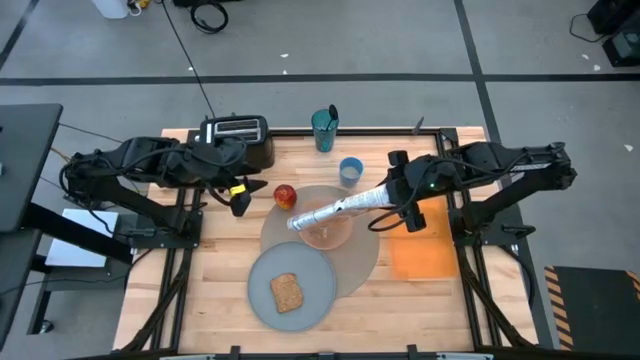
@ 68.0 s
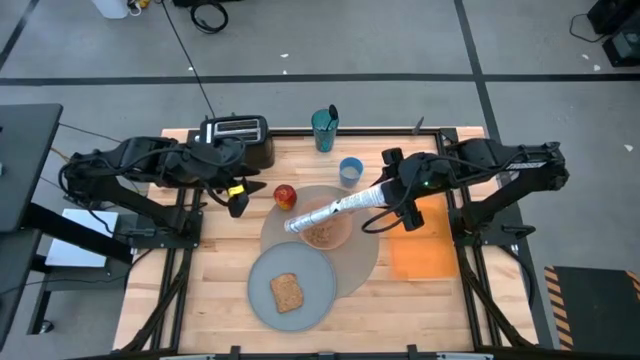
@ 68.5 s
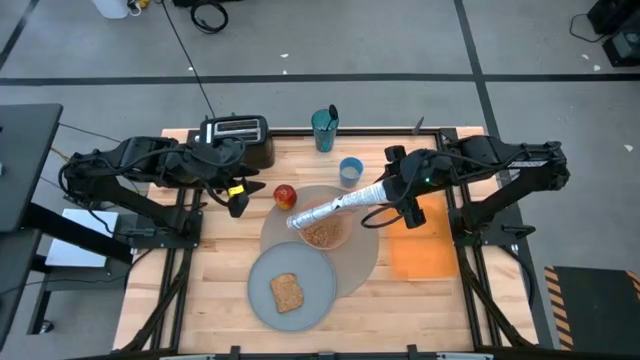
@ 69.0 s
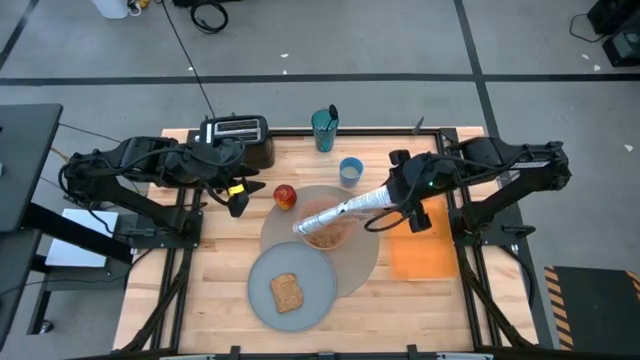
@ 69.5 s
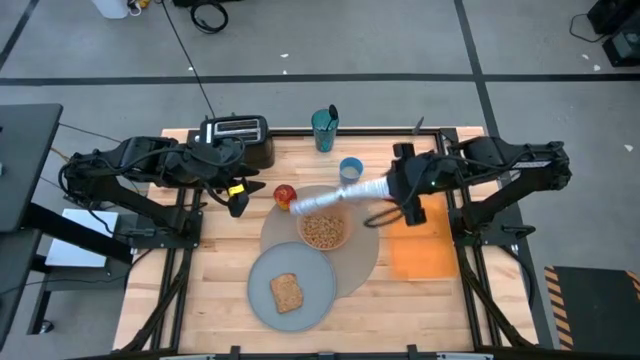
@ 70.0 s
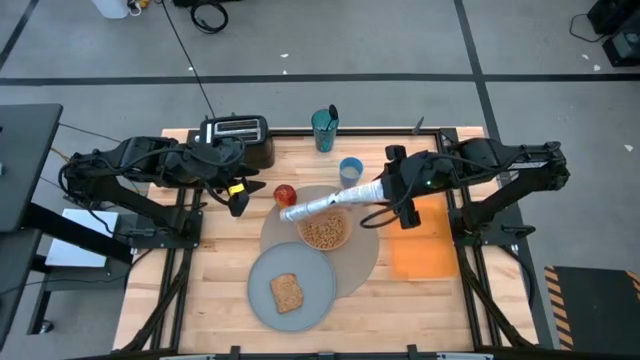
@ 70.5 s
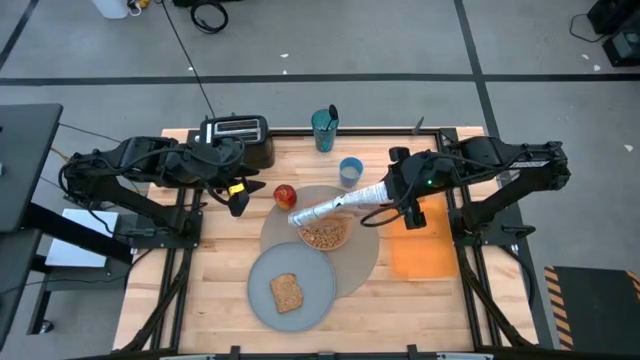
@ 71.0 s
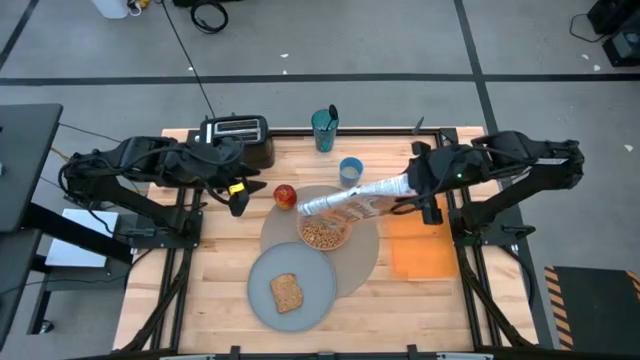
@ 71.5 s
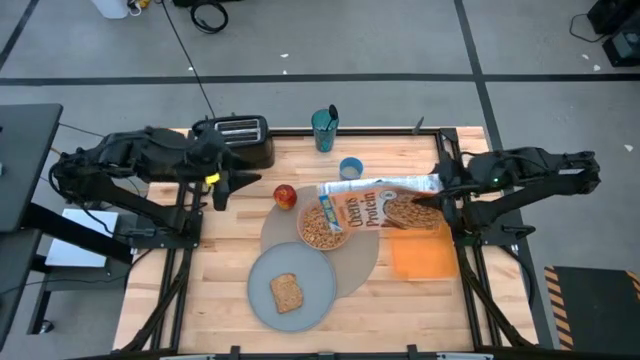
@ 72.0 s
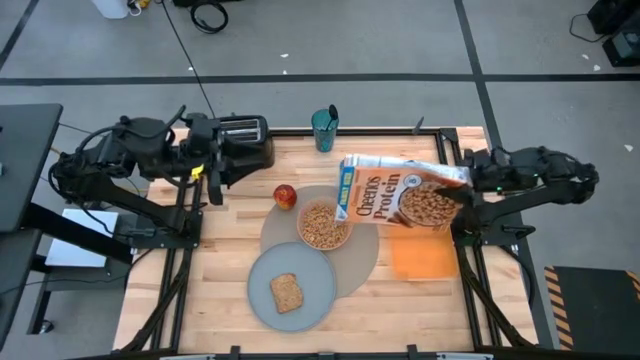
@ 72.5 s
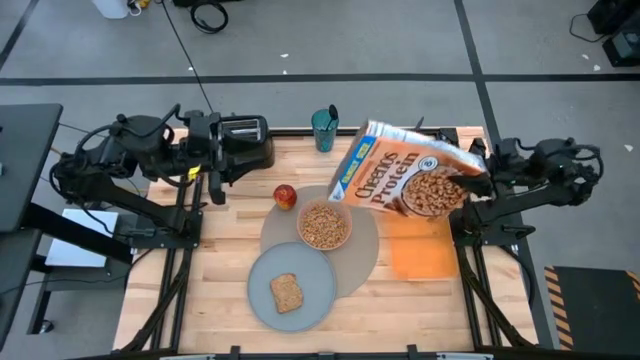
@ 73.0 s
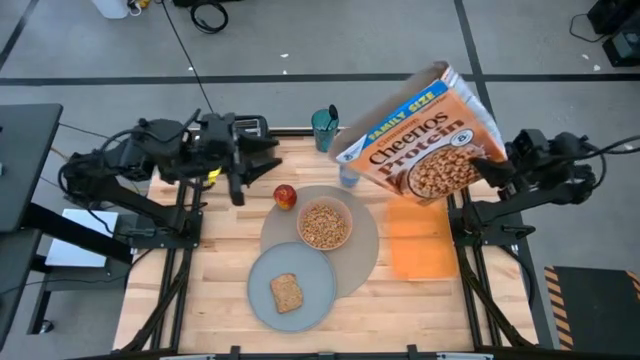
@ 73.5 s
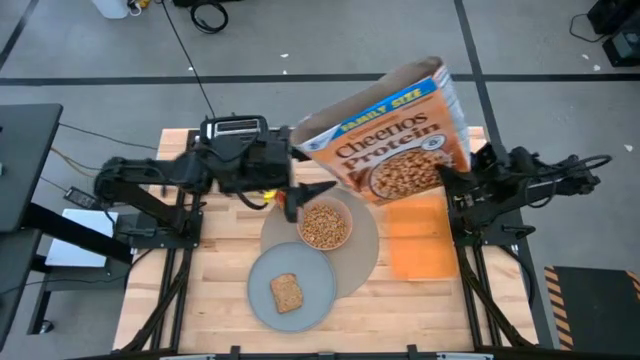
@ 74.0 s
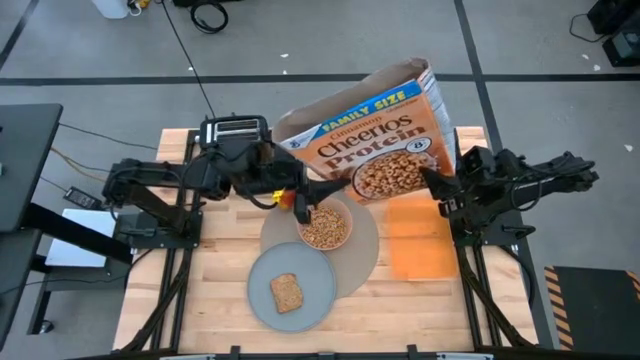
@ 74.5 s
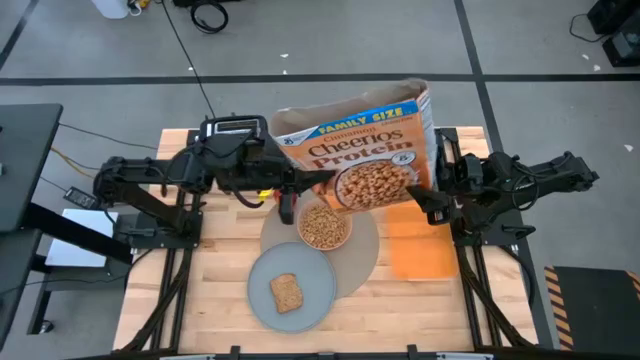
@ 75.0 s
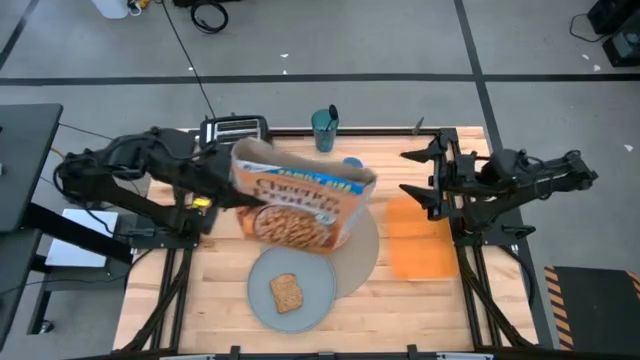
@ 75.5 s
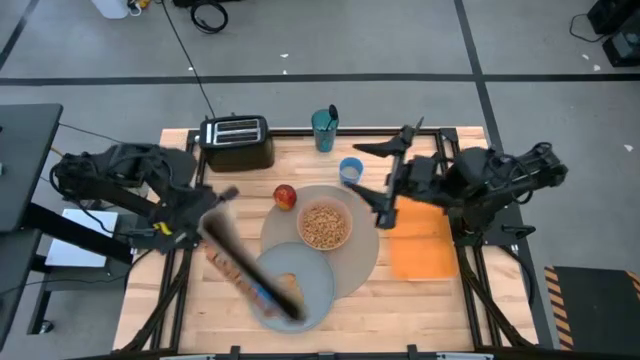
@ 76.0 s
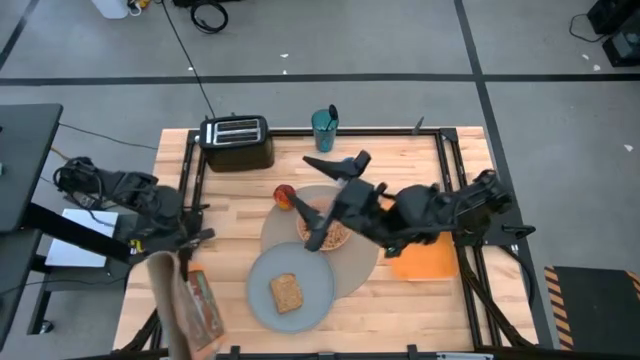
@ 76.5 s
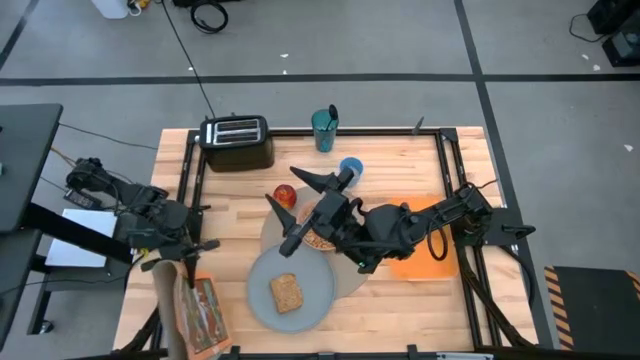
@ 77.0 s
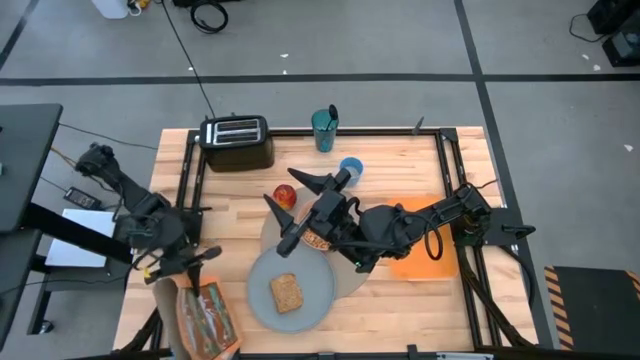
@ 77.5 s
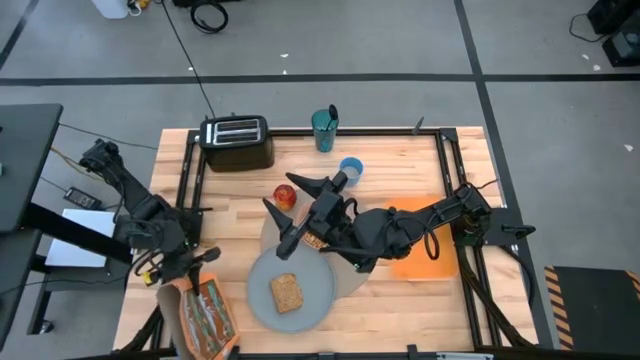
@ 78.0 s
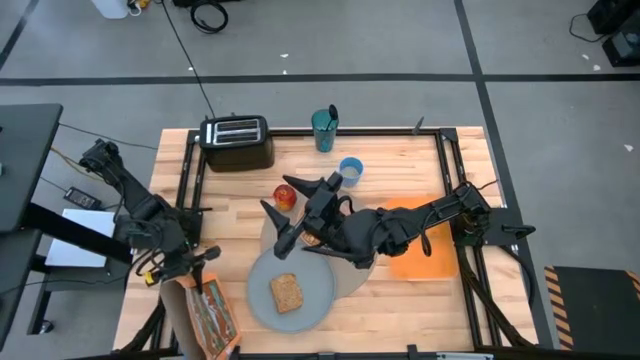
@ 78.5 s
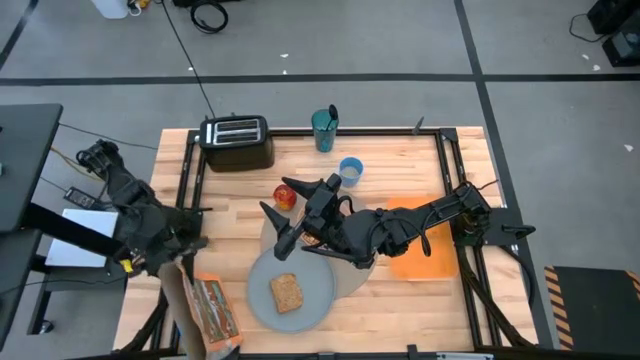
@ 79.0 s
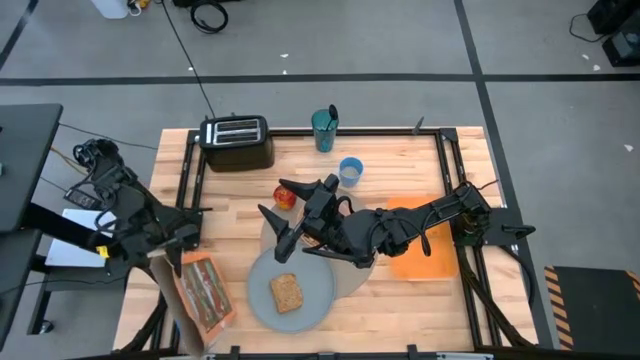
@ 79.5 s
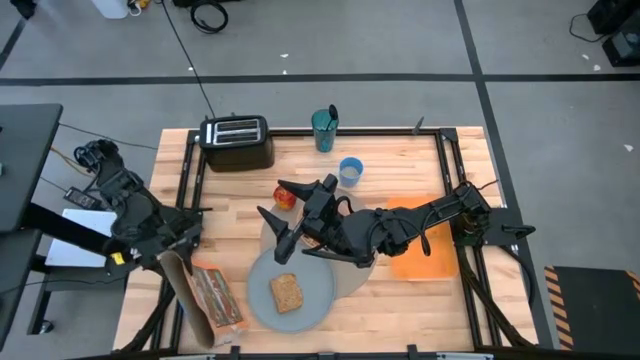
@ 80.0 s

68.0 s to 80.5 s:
Task: Arrange a breakfast setting
Pour the cereal from the cereal box into the light orange bowl

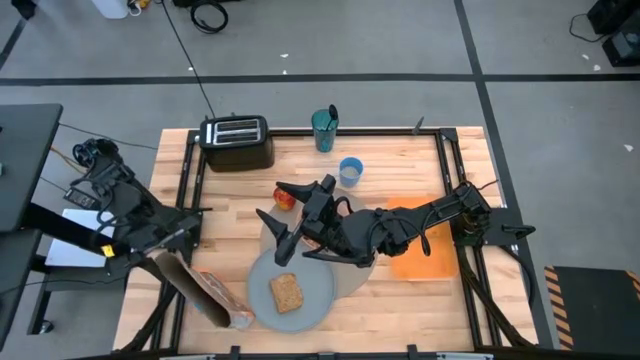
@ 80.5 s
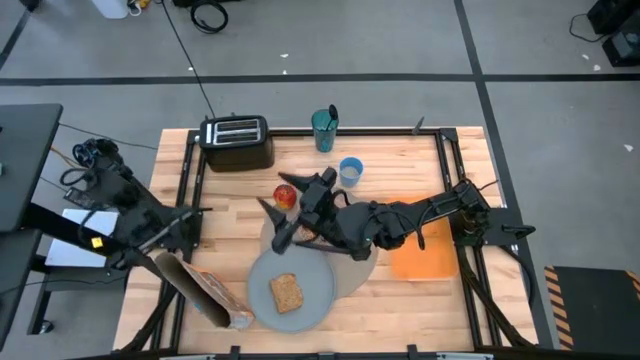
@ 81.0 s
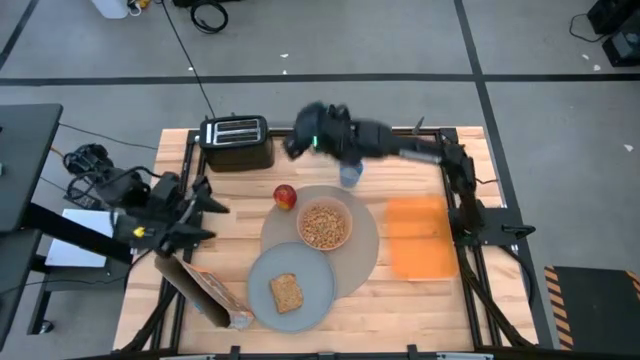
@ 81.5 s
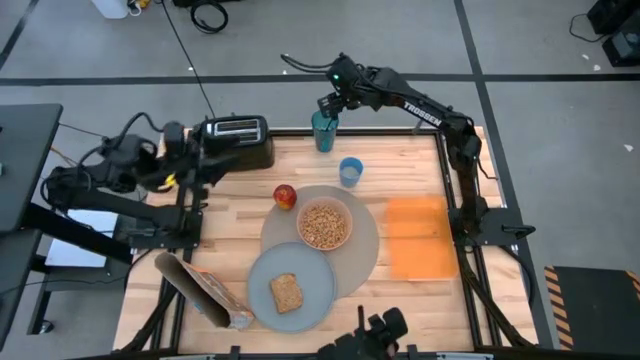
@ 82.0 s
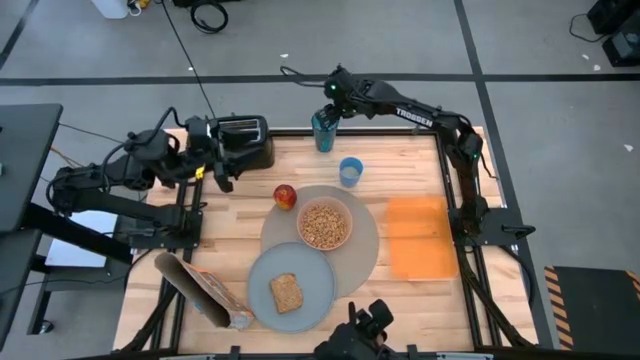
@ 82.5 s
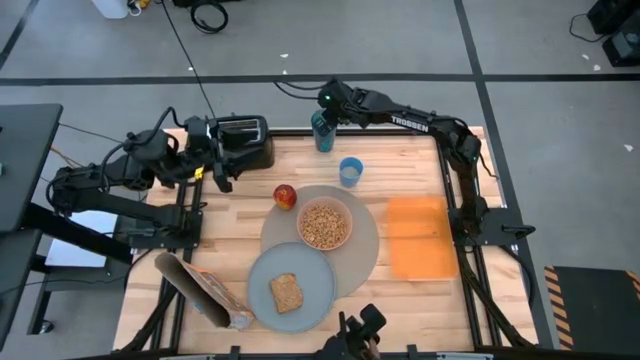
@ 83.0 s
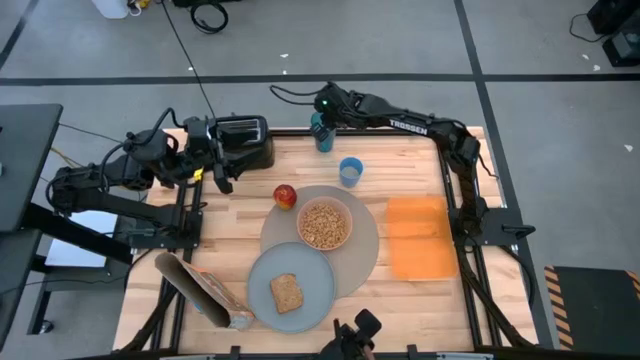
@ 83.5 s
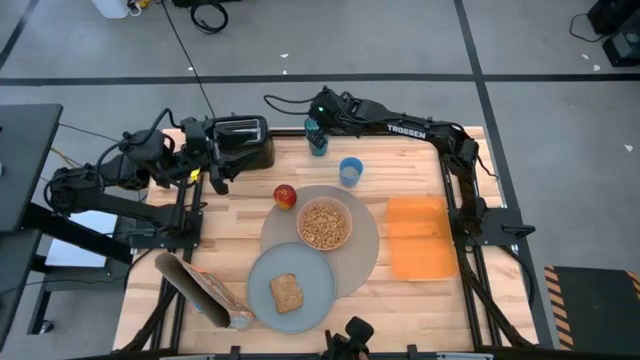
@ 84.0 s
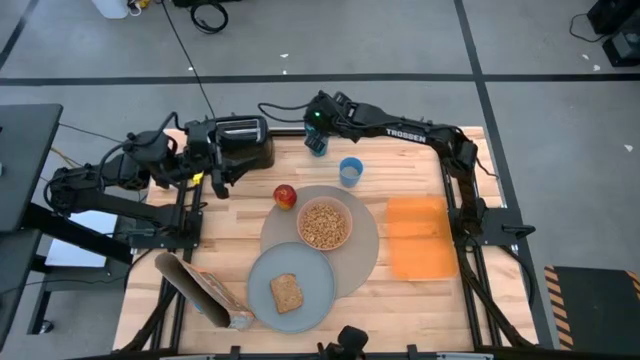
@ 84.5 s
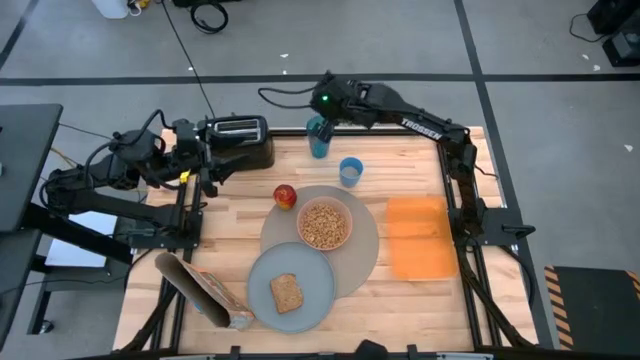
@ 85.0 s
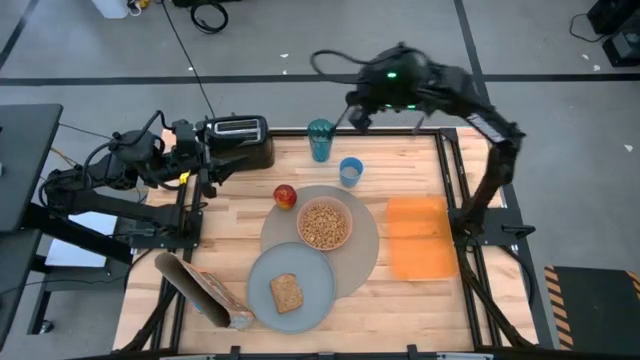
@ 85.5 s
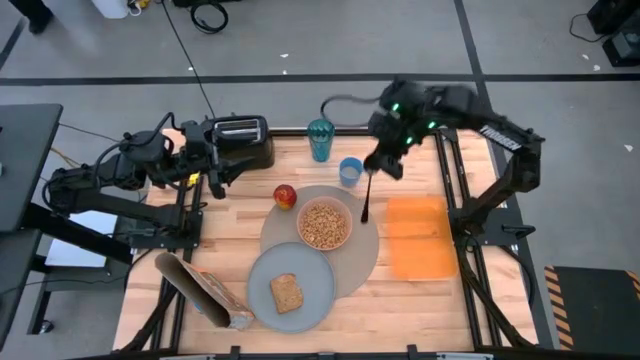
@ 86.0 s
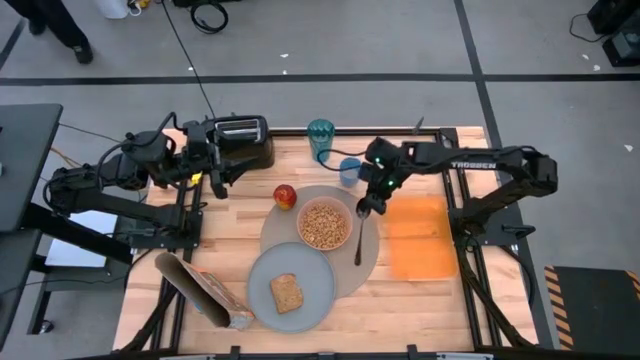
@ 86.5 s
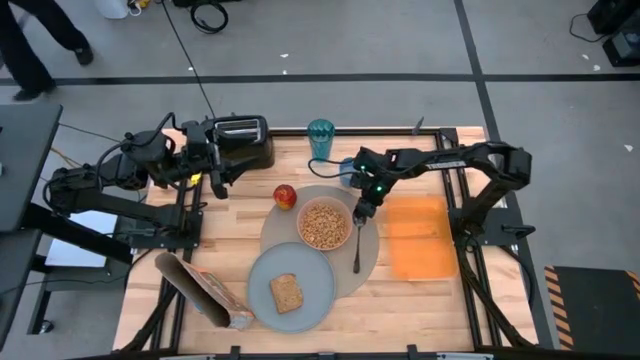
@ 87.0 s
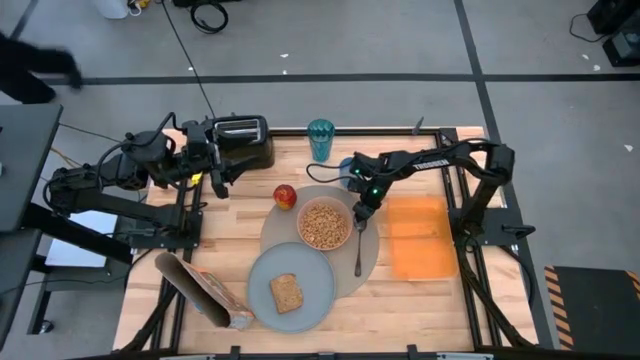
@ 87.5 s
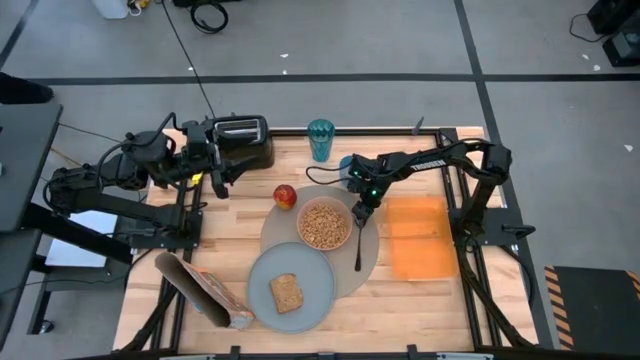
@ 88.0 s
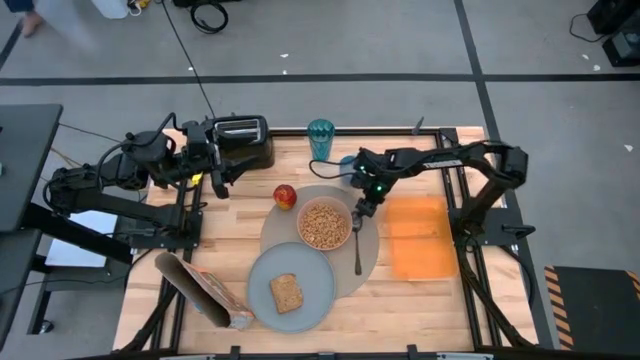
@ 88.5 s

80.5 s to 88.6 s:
Put the black spoon on the brown table mat to the right of the light orange bowl
